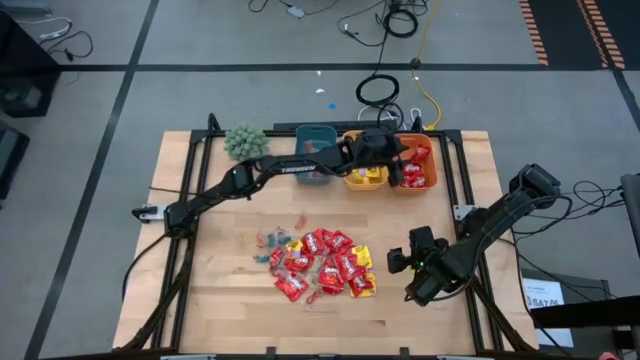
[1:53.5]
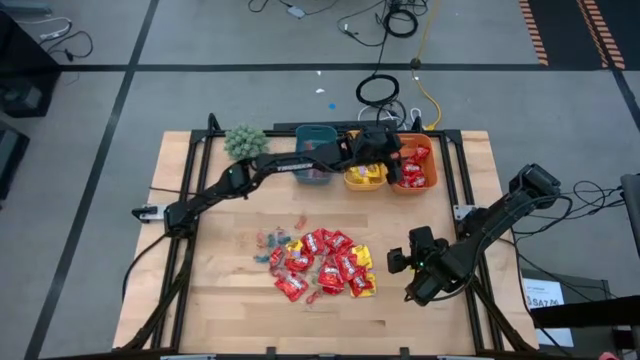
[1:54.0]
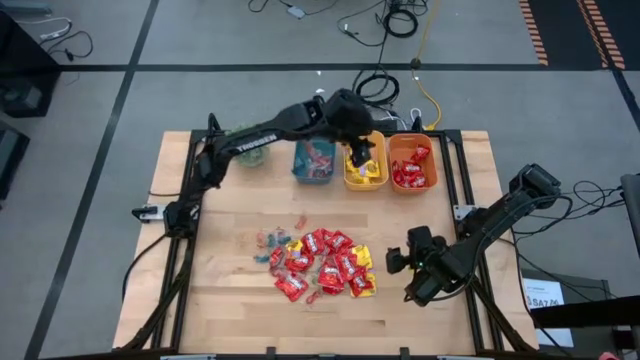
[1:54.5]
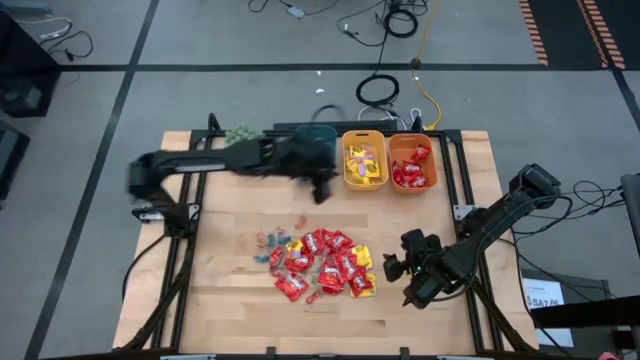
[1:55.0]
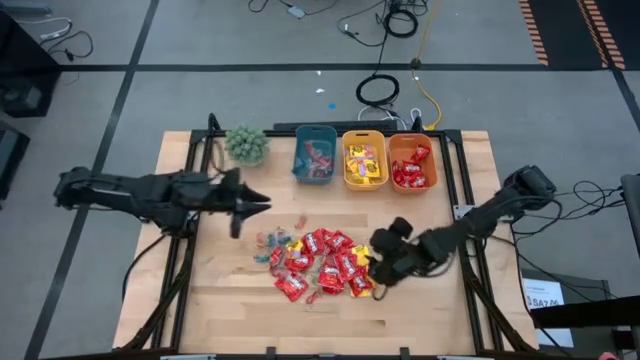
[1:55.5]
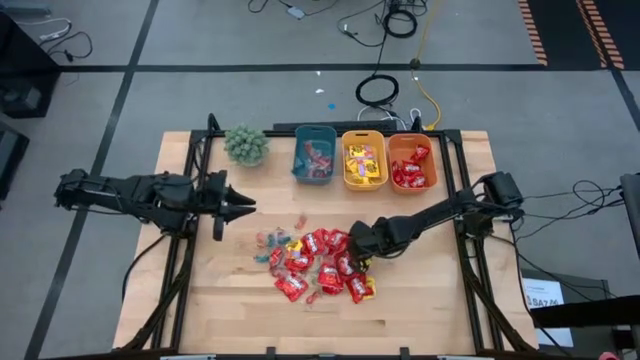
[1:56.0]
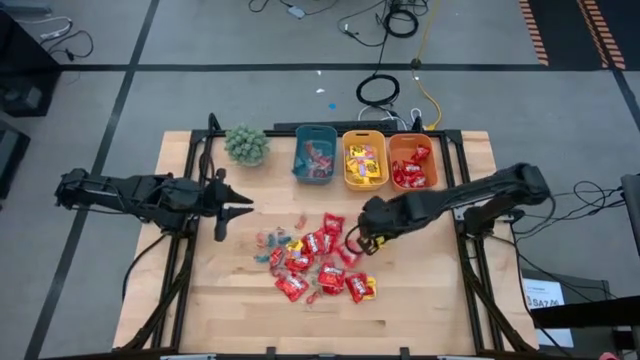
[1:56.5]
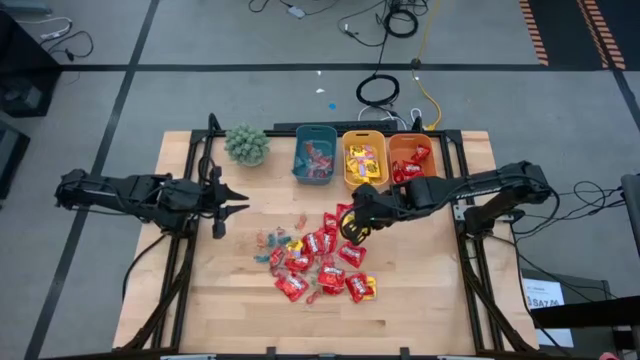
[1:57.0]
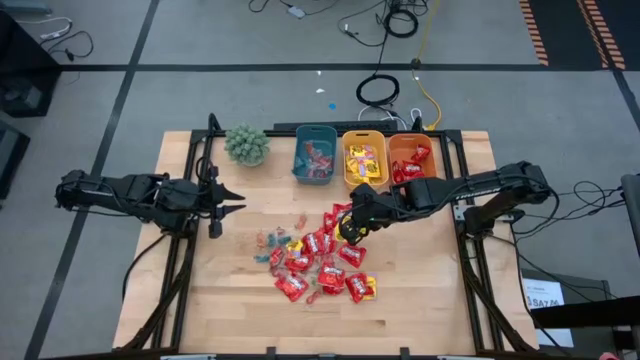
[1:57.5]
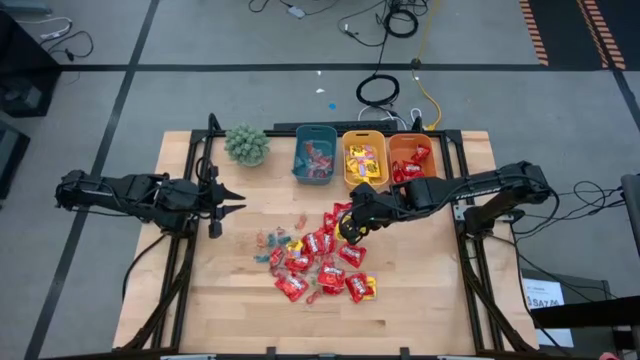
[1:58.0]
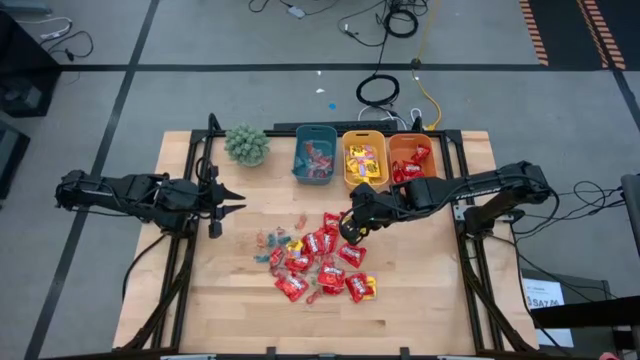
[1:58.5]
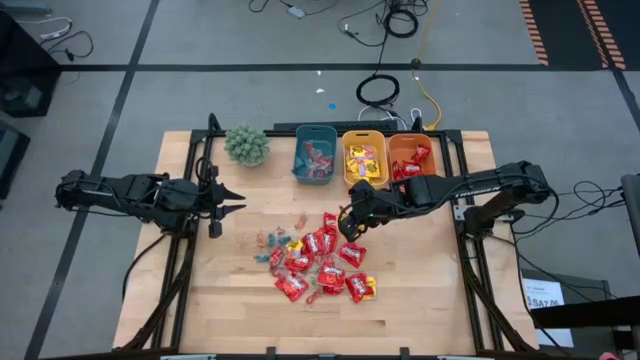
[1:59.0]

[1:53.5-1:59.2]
Task: Sort candy
Put the yellow candy into the yellow bin

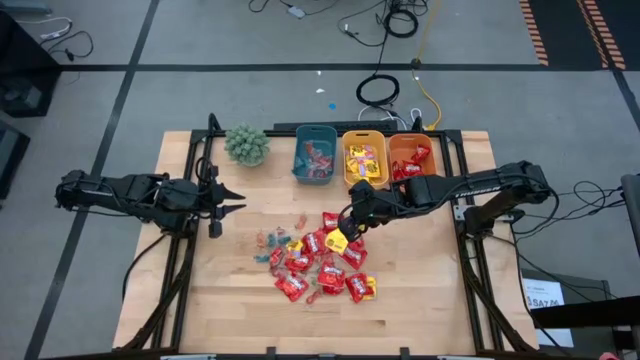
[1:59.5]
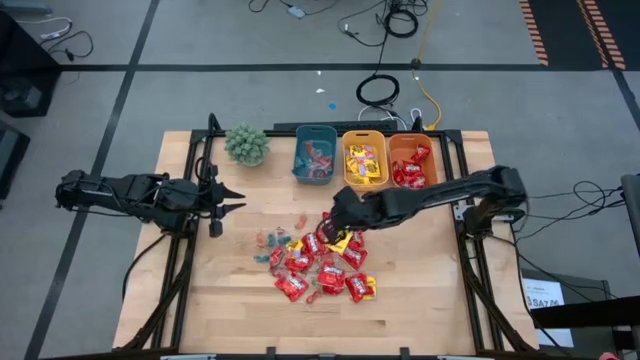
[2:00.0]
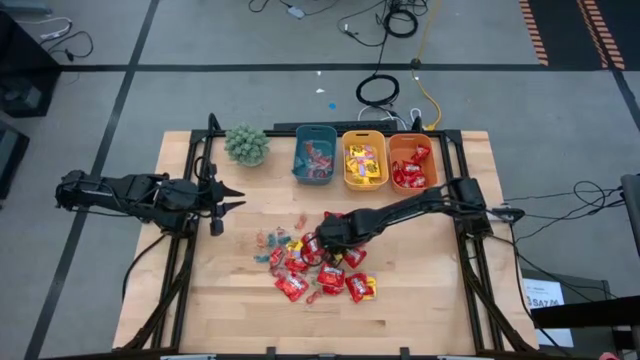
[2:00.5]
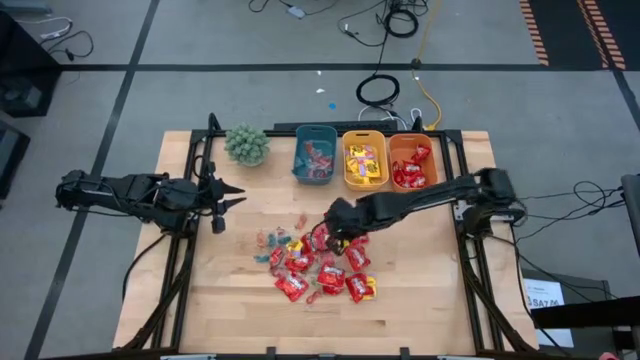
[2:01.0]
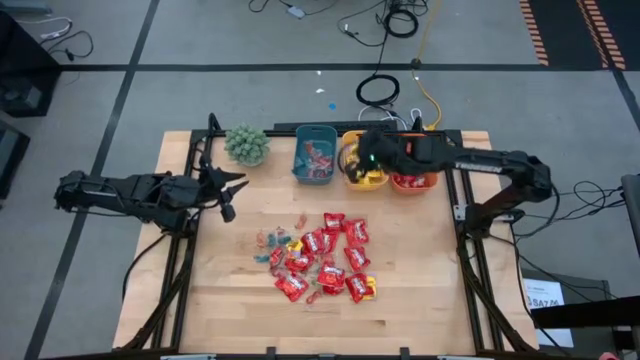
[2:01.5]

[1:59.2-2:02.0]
Put the yellow candy into the yellow bin

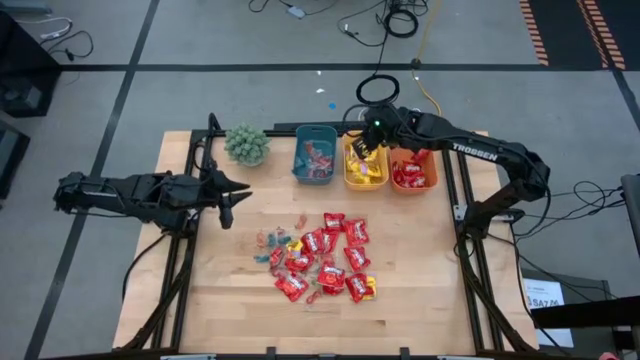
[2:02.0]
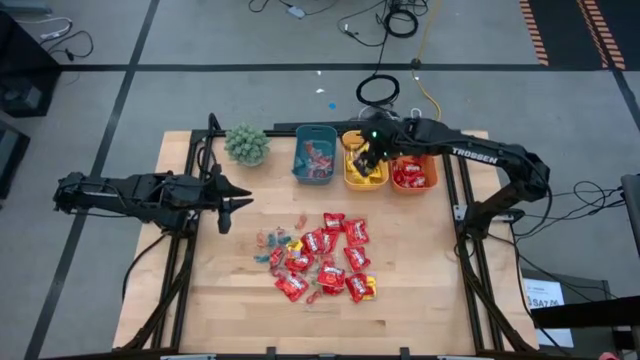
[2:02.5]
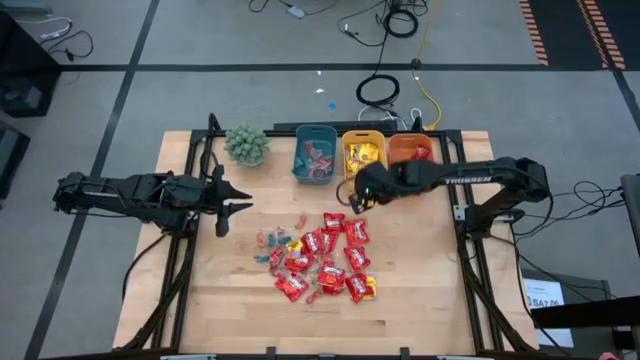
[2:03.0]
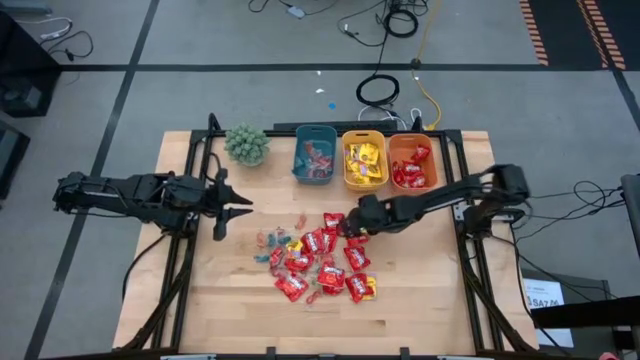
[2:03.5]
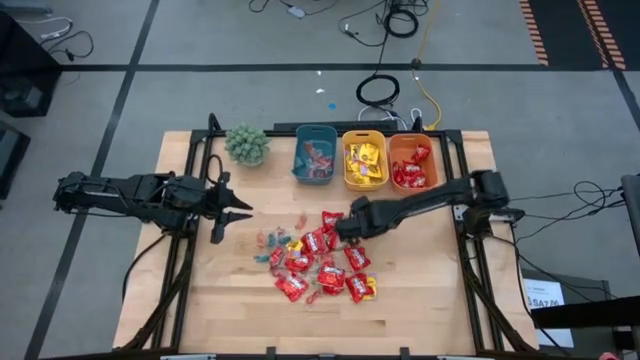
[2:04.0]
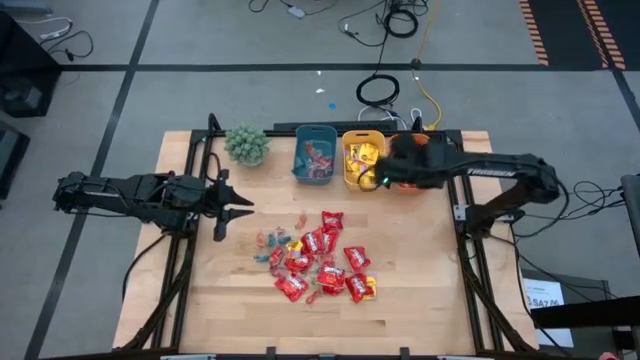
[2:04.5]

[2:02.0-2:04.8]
Put the red candy into the orange bin

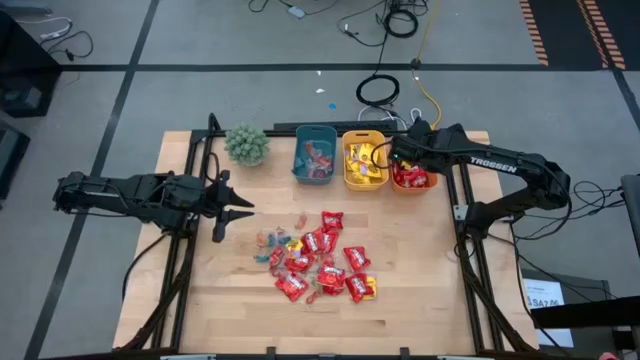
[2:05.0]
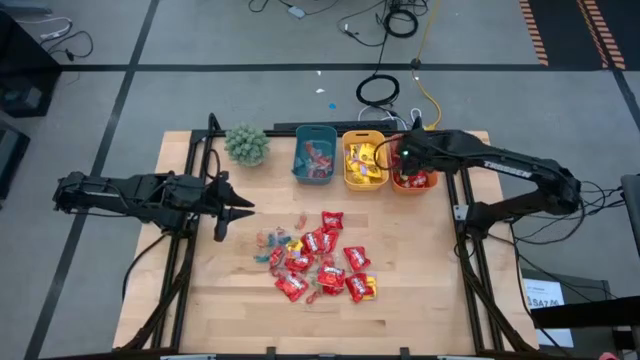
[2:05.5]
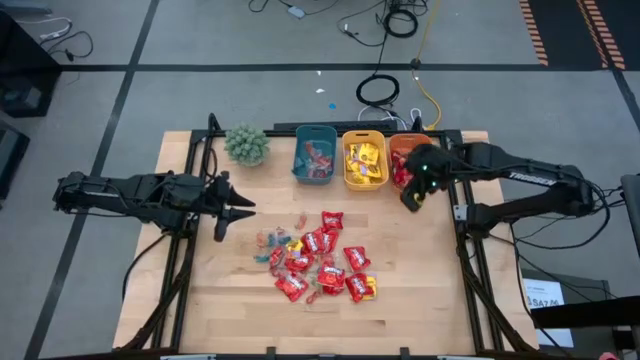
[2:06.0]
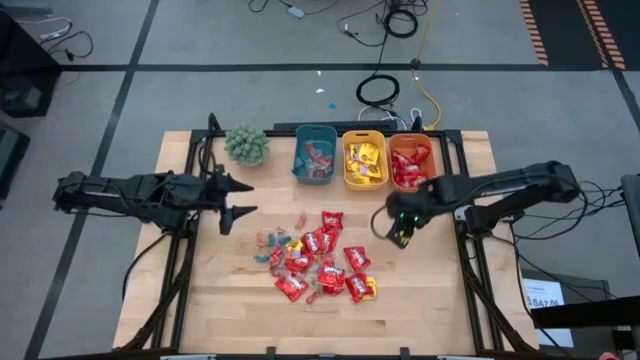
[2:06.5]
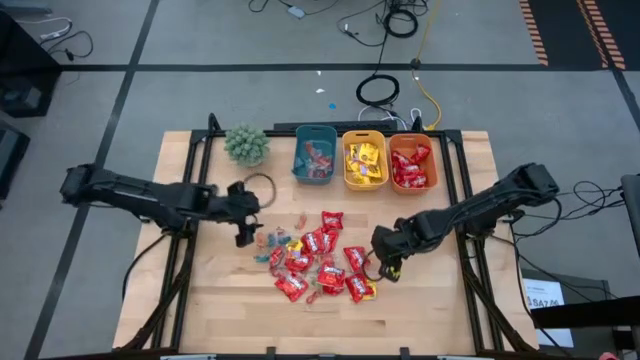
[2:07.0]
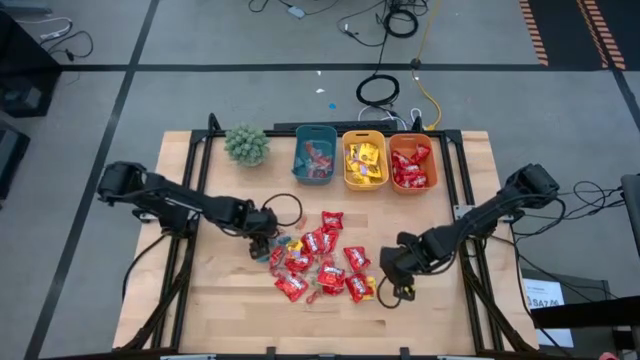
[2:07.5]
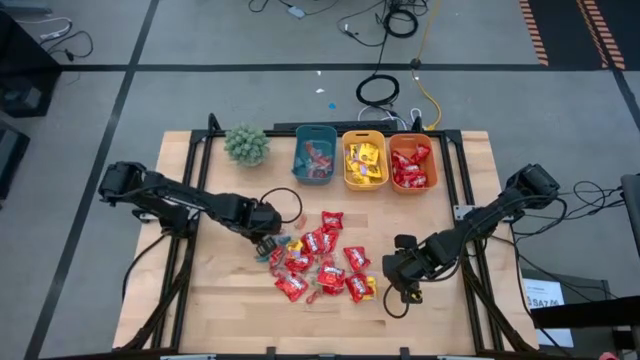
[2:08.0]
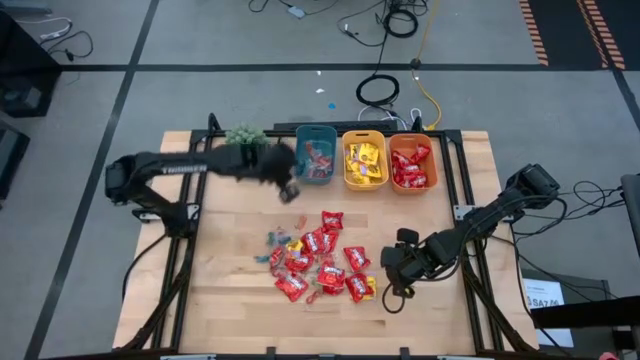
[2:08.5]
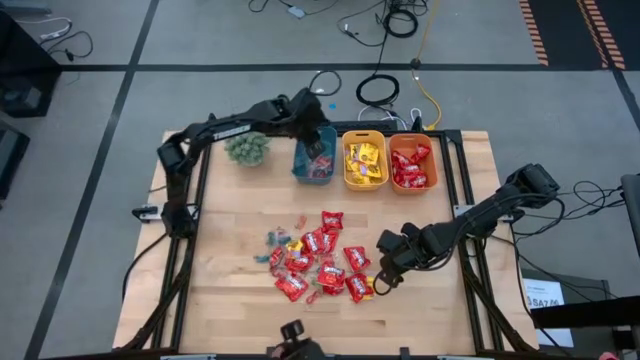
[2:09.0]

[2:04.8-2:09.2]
Put the orange gummy into the blue bin

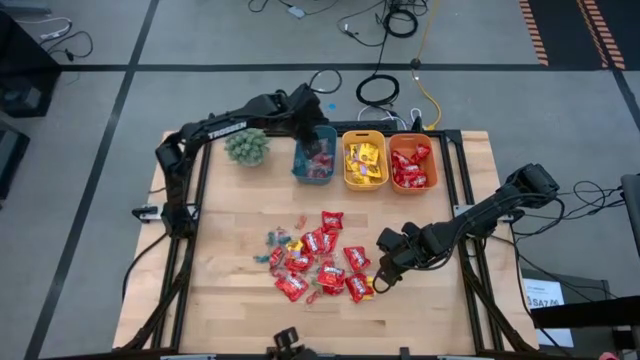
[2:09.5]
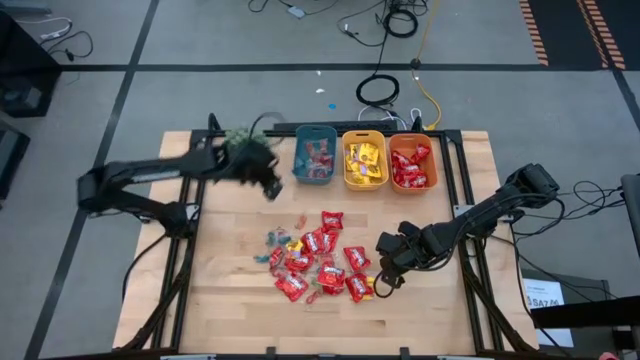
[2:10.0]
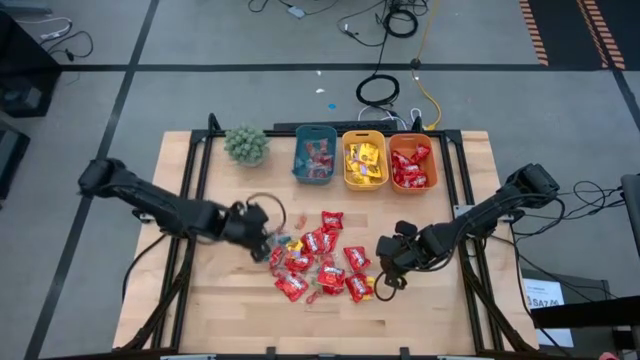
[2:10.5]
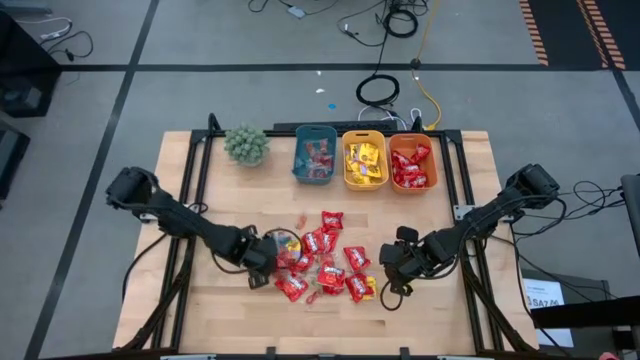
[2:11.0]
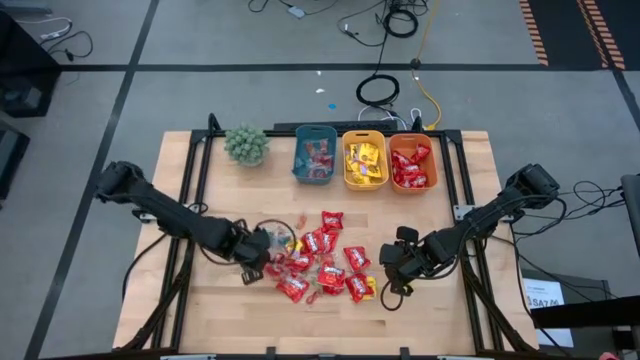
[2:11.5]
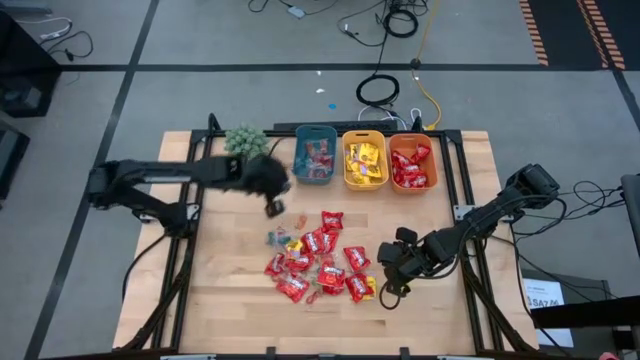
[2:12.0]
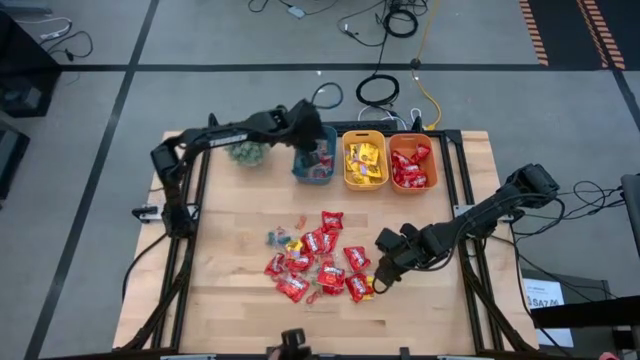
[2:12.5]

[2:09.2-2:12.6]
Put the blue gummy into the blue bin

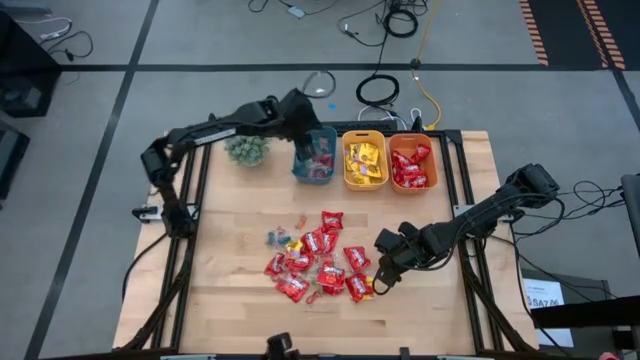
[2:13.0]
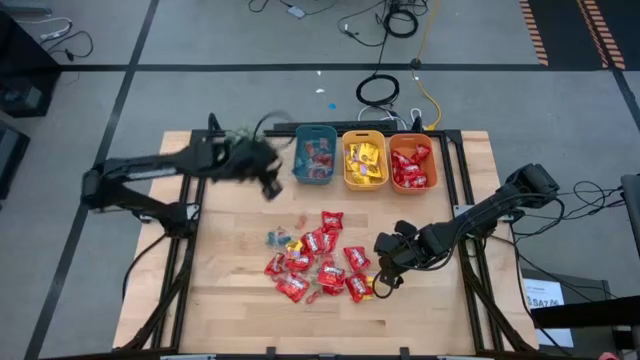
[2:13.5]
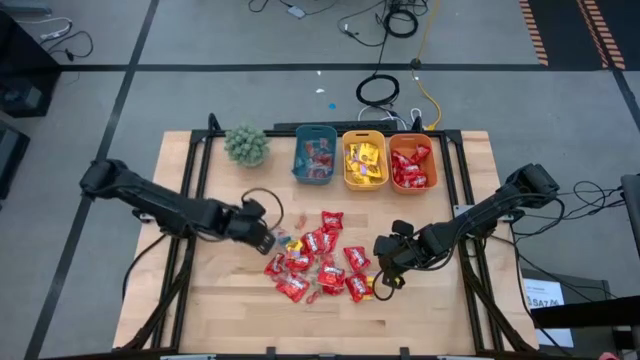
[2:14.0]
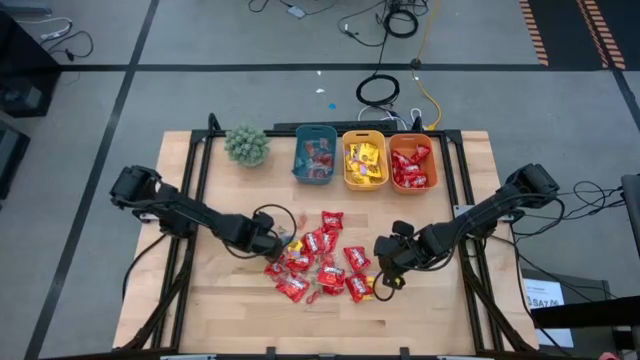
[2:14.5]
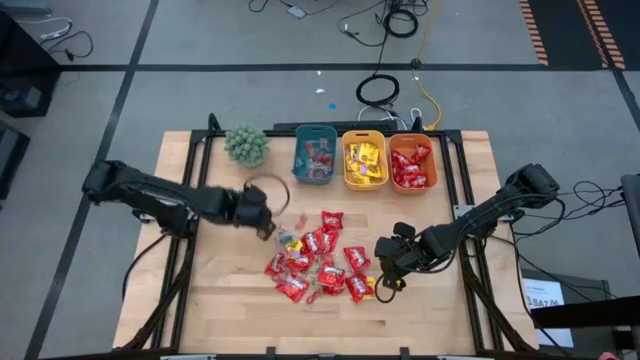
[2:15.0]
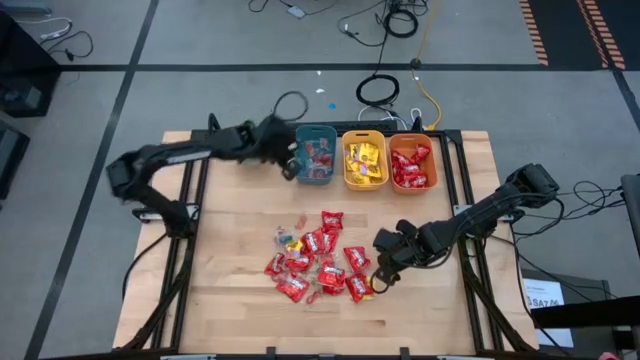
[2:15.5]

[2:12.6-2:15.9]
Put the blue gummy into the blue bin
